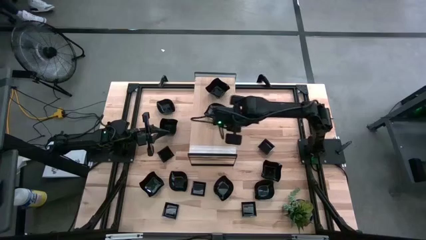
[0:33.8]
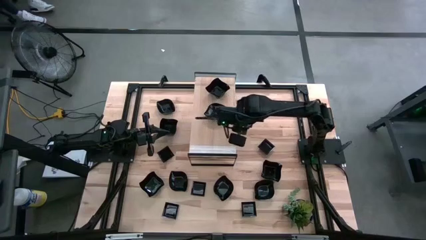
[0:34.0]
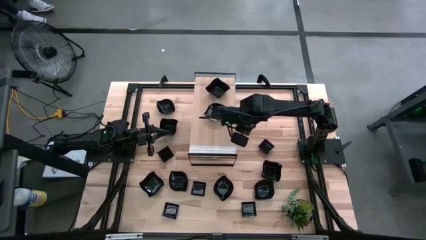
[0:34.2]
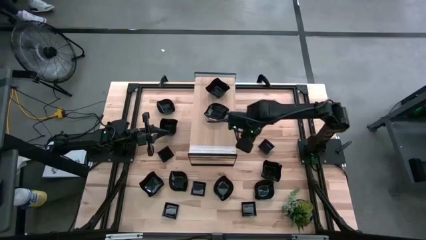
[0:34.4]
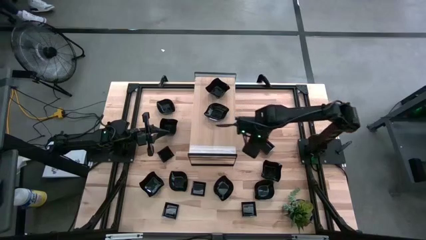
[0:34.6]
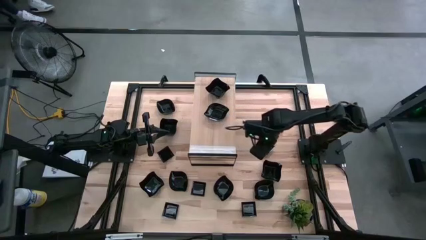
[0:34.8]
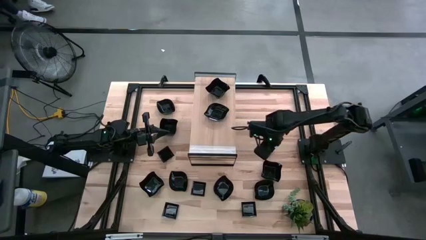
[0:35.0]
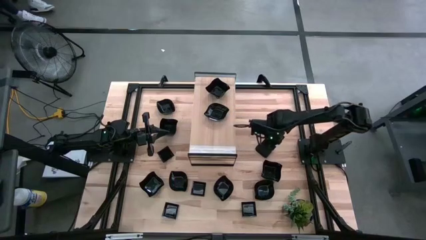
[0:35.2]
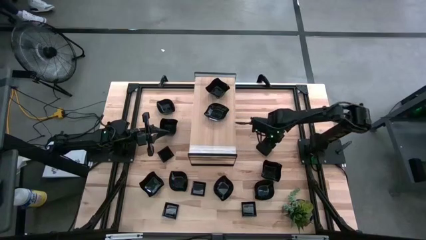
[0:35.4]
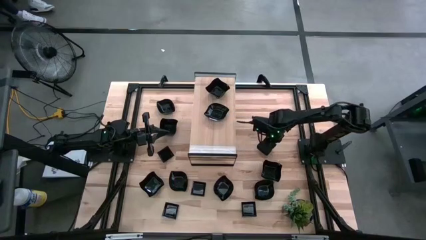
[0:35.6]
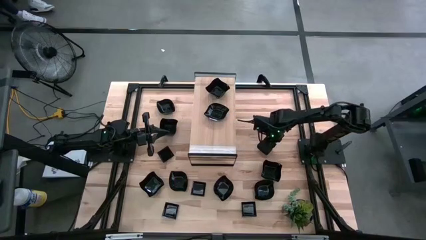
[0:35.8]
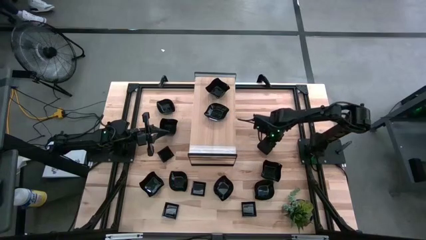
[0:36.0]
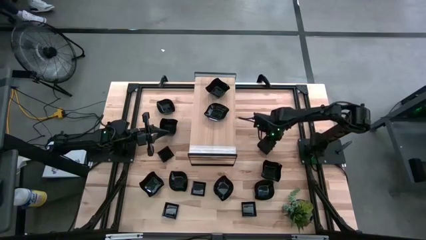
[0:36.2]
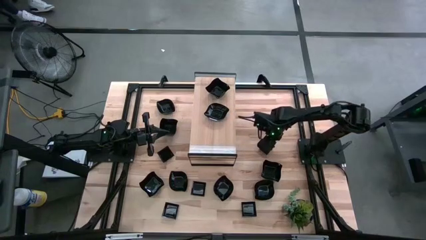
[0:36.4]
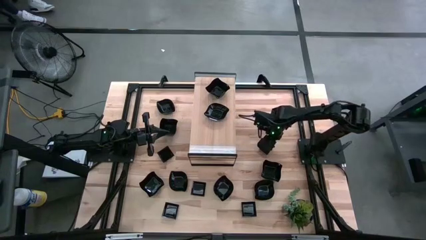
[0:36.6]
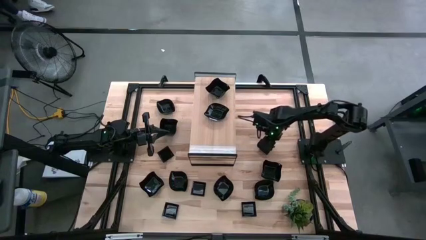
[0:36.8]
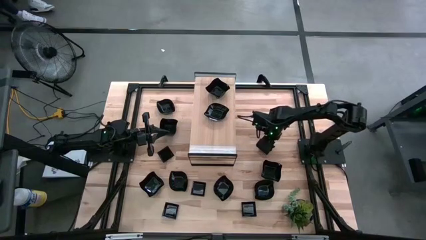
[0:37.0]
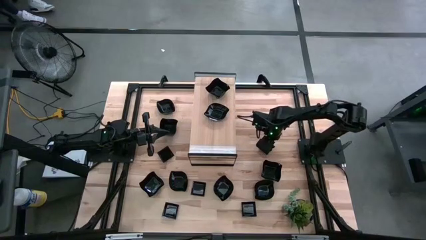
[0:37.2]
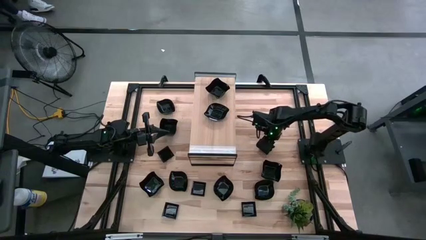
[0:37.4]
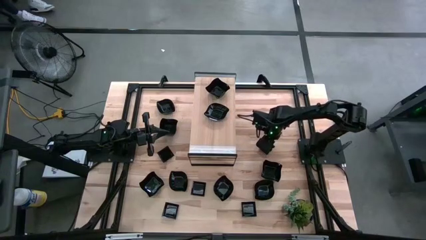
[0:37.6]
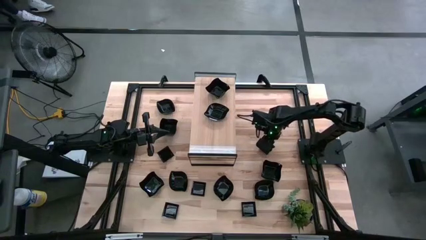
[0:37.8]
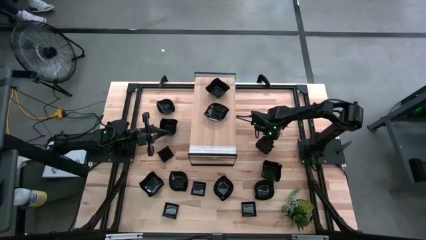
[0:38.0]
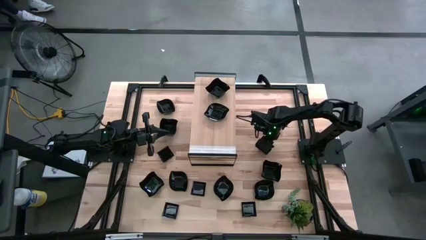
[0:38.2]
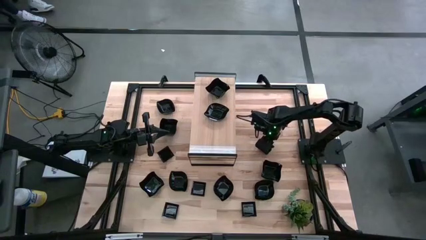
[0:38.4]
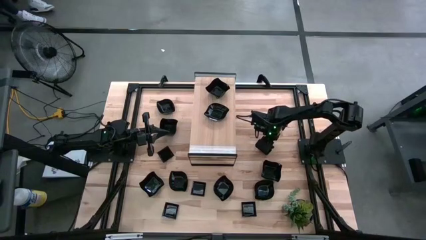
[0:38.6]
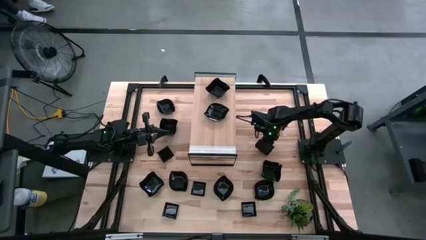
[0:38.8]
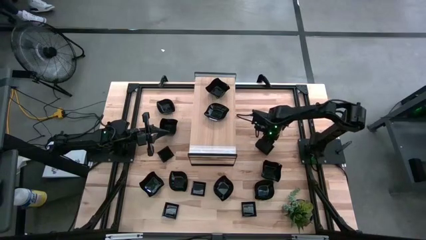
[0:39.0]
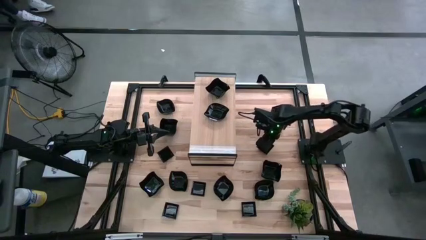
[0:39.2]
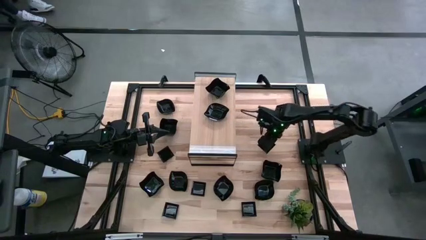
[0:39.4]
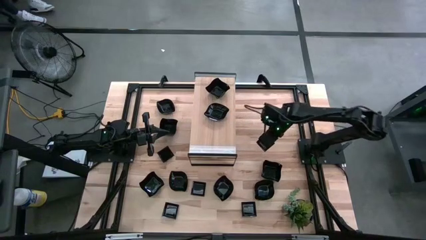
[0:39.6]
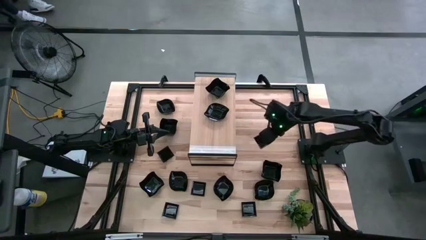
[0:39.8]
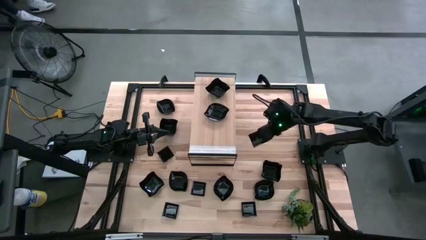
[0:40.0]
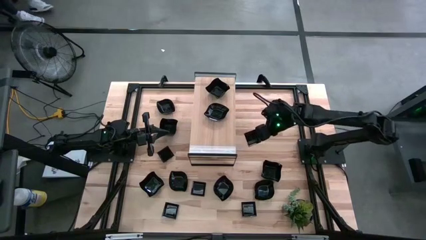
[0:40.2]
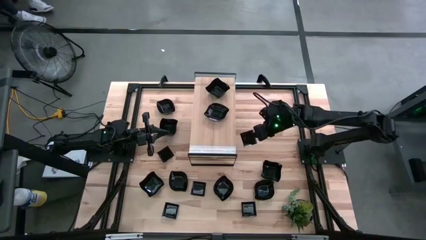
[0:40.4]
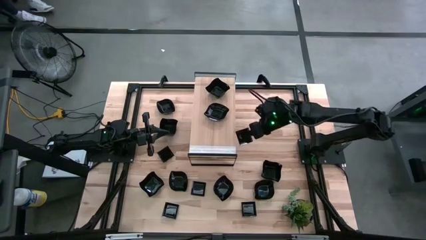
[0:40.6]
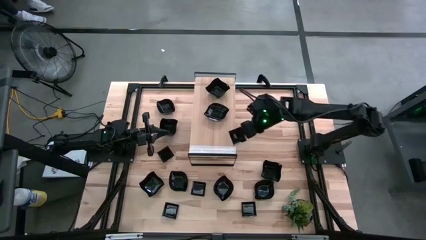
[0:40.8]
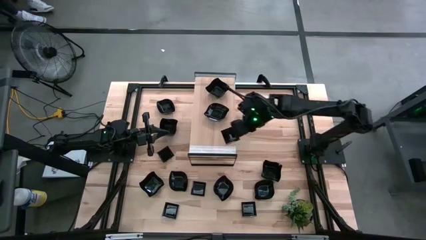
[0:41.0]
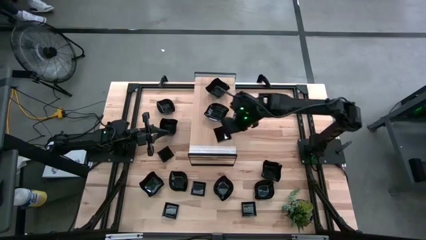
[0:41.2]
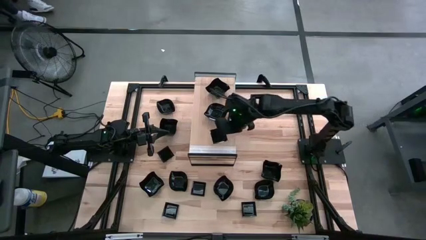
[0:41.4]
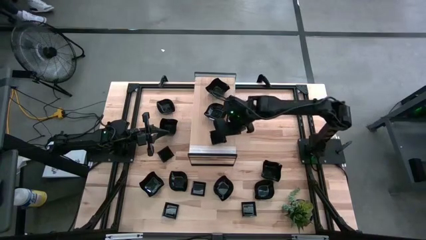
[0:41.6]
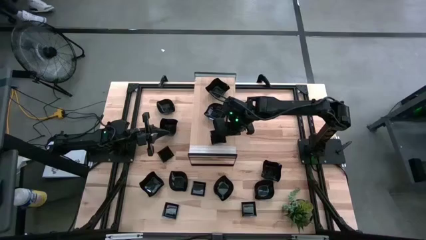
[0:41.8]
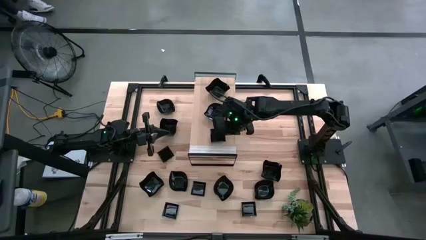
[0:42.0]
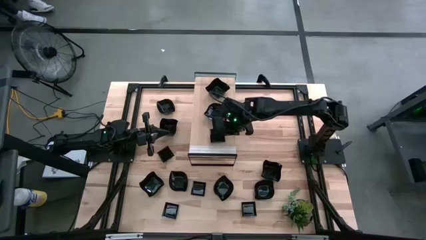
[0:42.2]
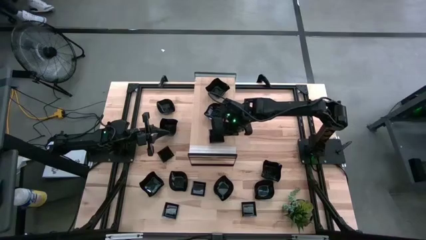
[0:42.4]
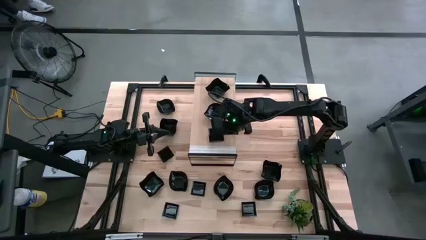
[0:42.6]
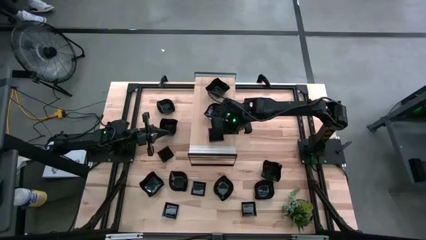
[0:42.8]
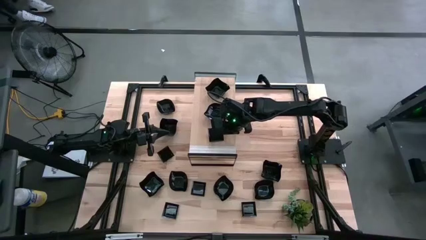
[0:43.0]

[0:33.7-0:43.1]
Task: Pick & Place Mini shaped plates
Put the square-shaped plate on the shelf

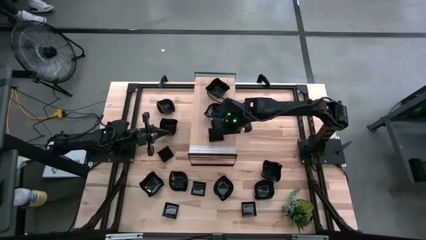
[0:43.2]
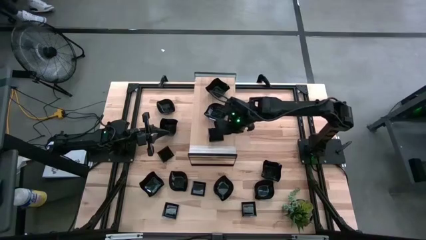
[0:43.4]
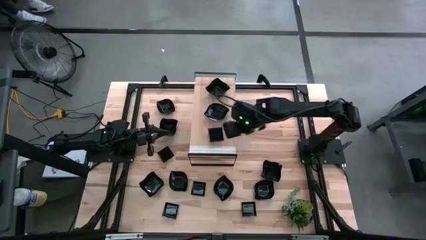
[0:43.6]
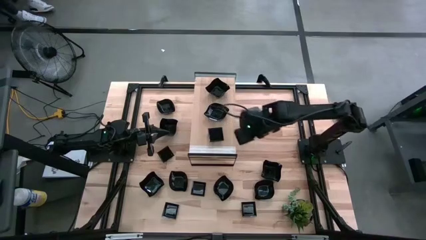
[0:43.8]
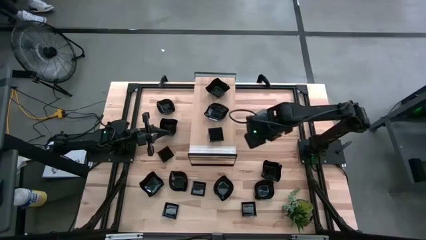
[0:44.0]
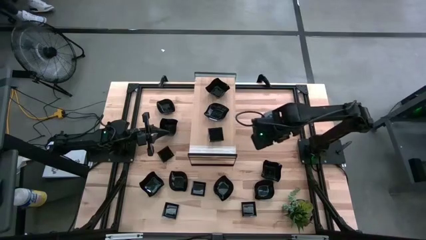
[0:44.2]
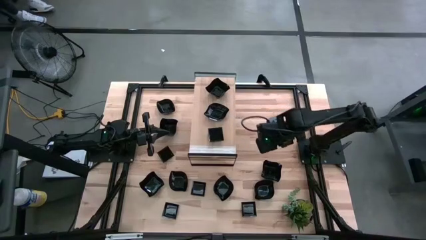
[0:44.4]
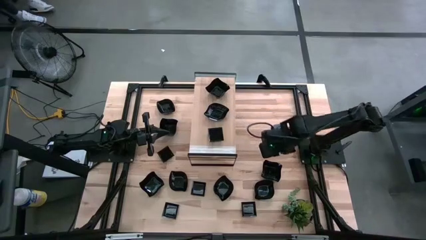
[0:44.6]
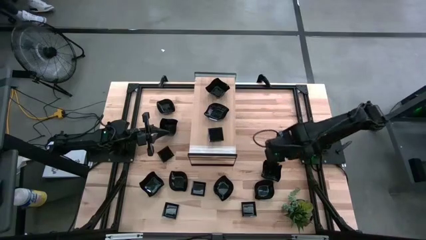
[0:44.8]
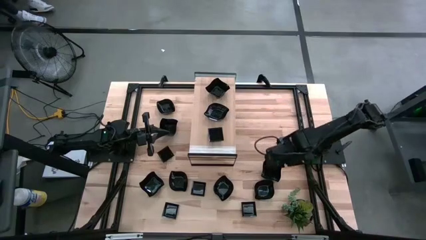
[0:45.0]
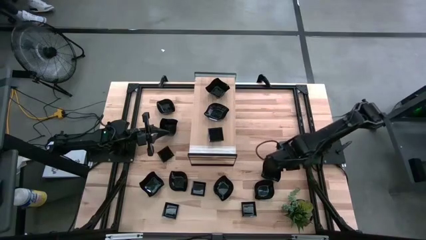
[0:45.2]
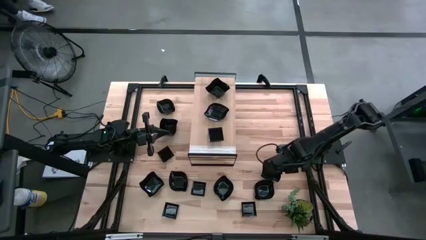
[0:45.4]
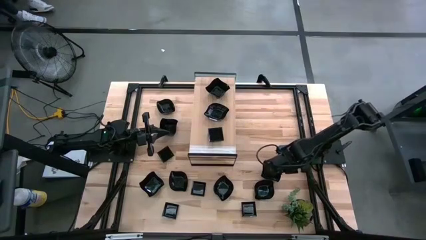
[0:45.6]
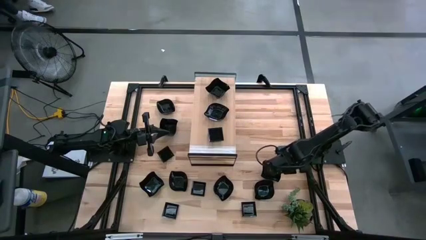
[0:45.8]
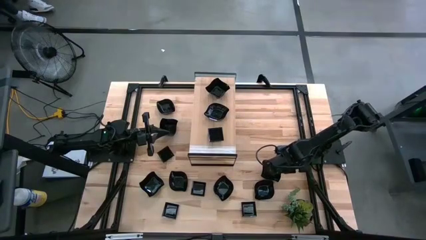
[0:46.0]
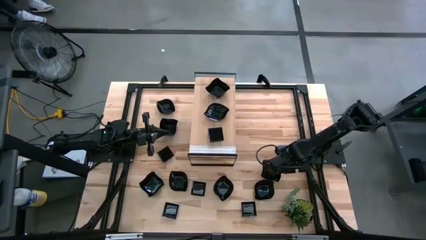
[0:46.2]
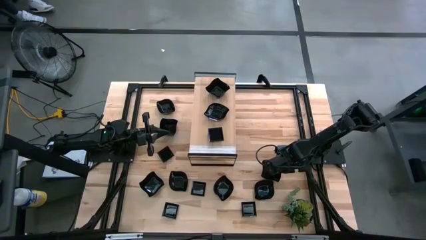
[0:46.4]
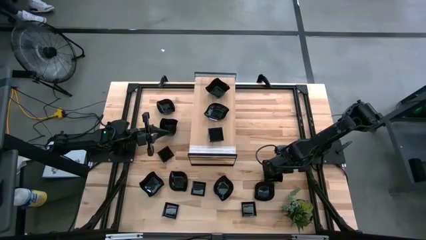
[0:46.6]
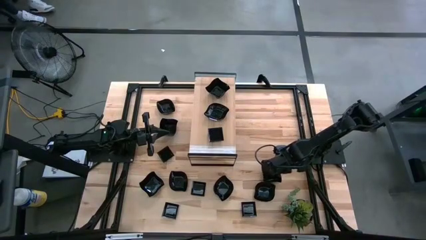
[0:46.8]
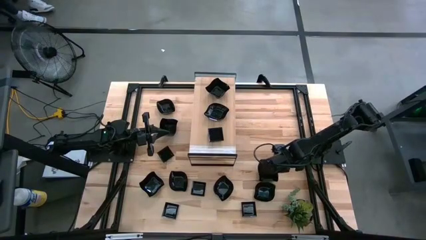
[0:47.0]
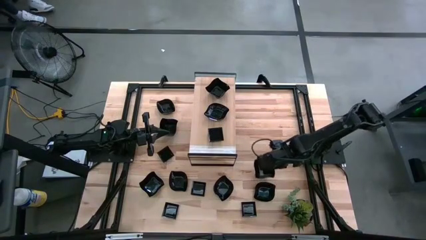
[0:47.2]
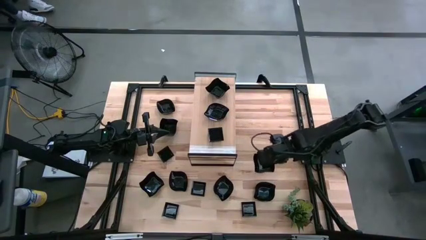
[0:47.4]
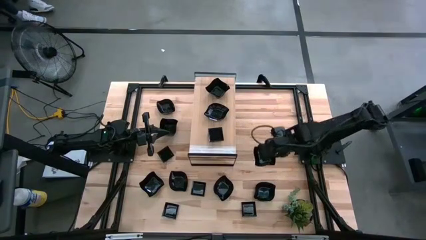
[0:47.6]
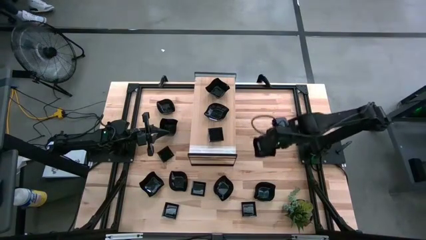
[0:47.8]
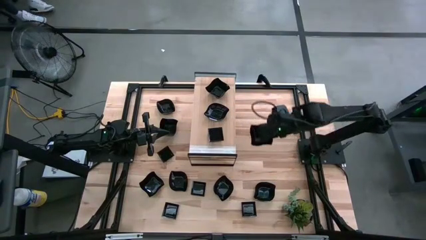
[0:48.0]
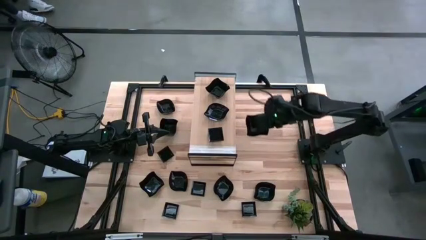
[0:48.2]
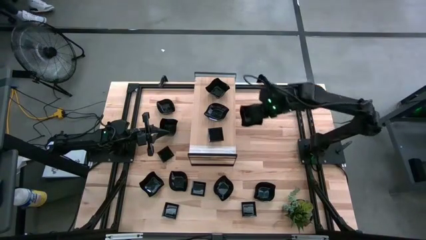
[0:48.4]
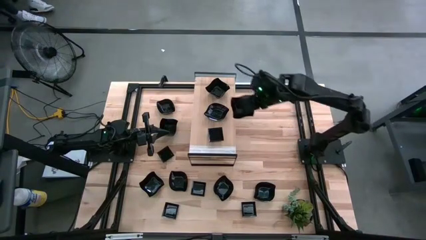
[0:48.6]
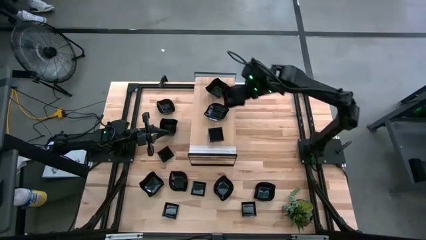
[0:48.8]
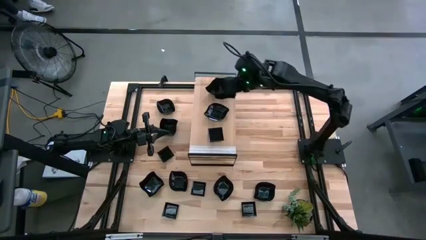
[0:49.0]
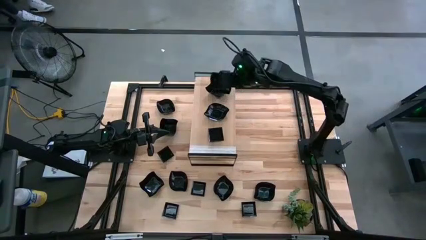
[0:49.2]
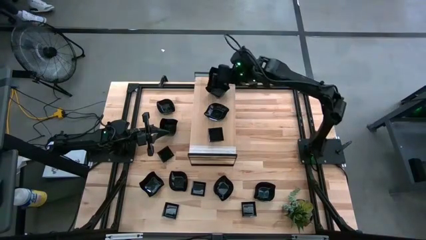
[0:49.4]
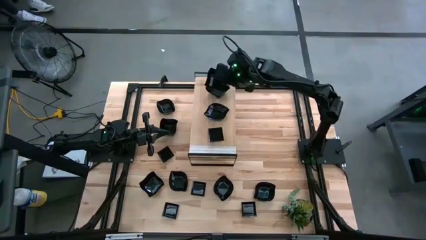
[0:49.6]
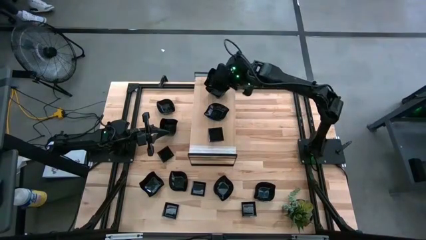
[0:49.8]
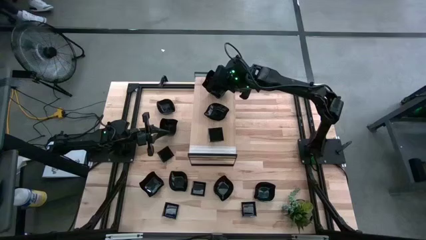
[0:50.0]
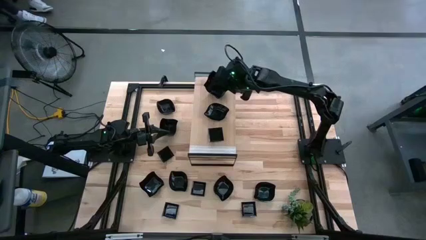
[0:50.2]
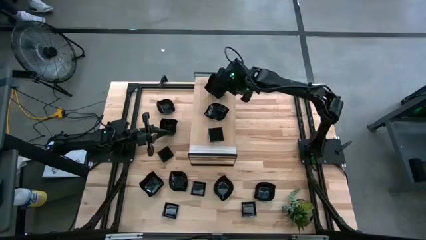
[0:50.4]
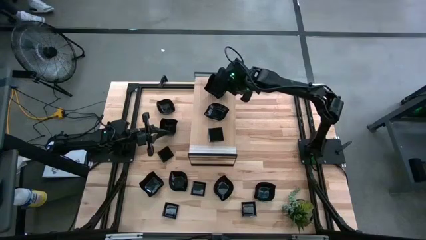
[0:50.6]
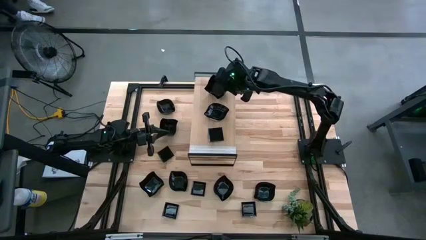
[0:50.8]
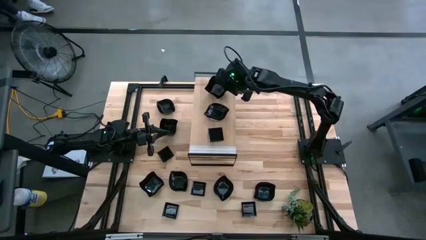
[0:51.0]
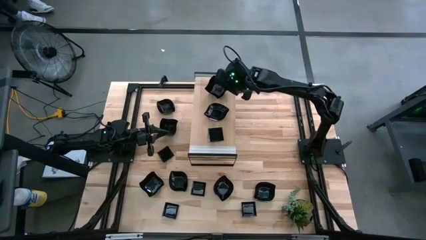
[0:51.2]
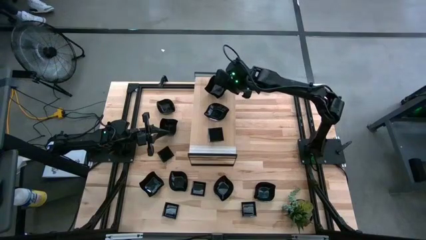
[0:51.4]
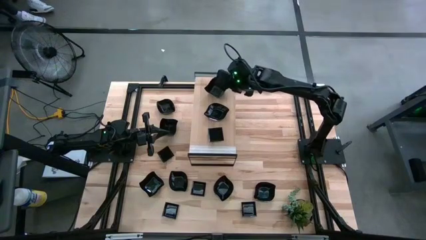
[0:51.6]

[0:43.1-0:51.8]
Stack the distorted square plate on top of the stacked distorted square plates on the shelf
